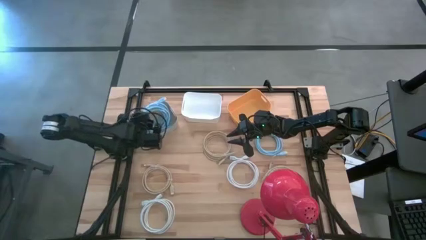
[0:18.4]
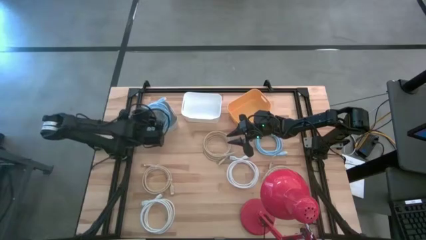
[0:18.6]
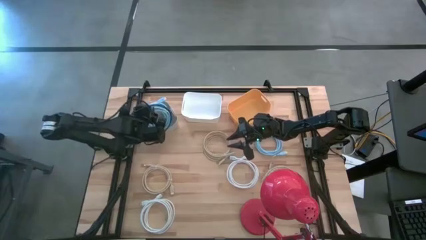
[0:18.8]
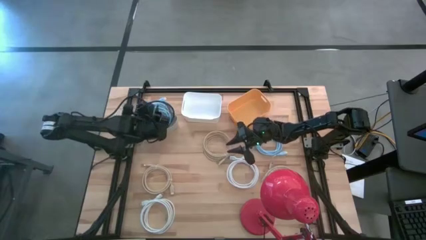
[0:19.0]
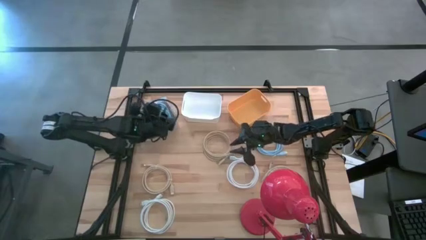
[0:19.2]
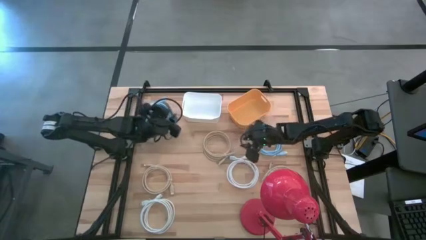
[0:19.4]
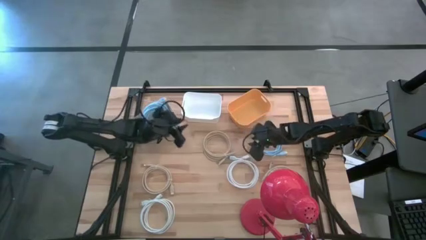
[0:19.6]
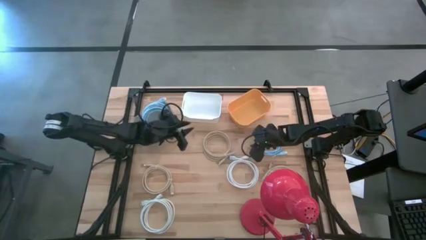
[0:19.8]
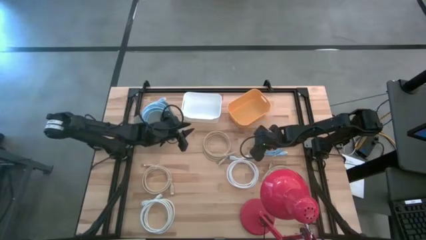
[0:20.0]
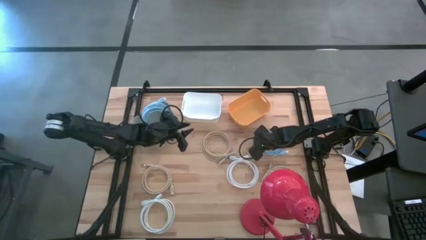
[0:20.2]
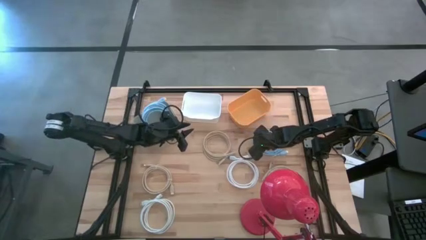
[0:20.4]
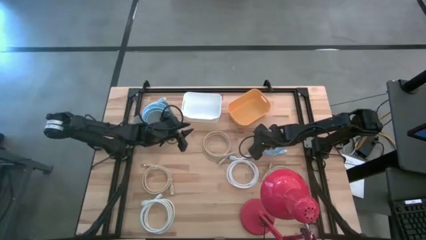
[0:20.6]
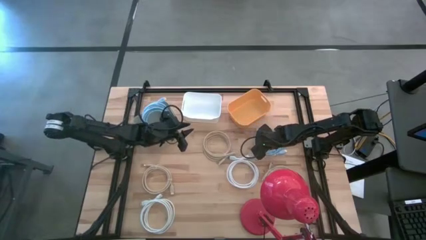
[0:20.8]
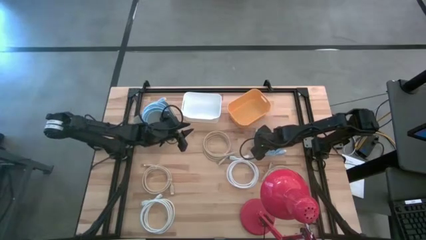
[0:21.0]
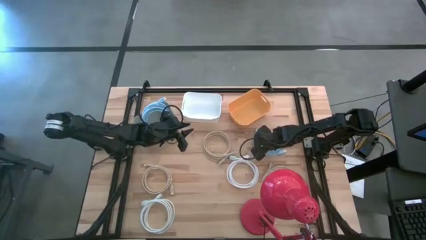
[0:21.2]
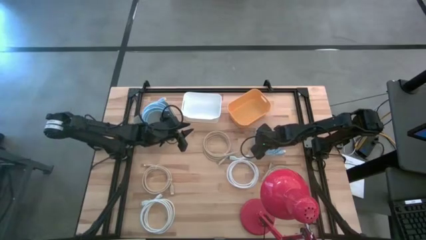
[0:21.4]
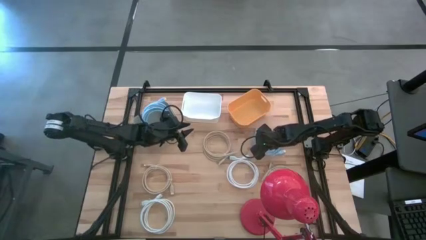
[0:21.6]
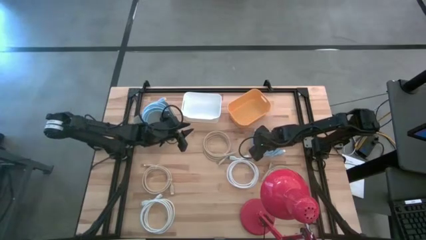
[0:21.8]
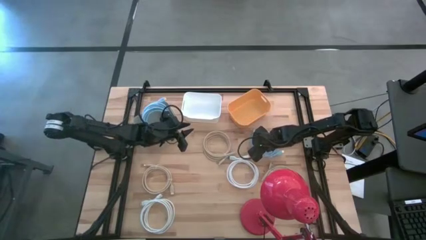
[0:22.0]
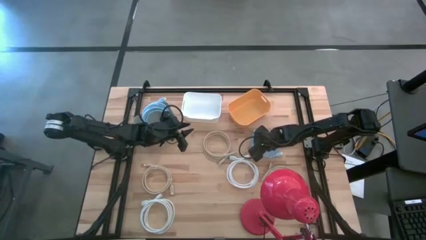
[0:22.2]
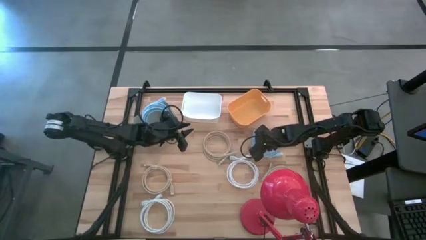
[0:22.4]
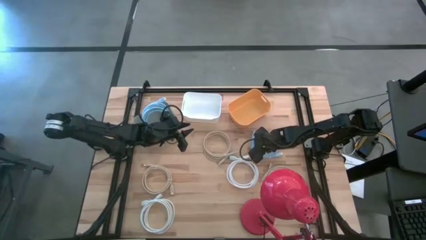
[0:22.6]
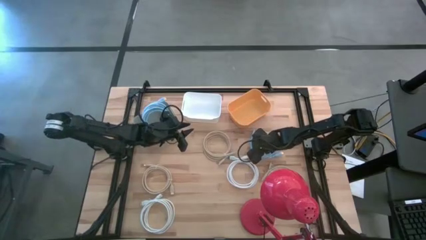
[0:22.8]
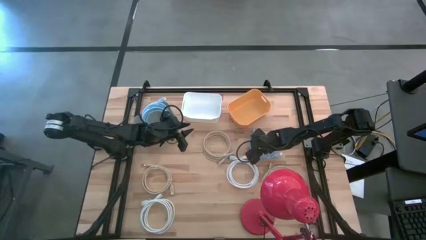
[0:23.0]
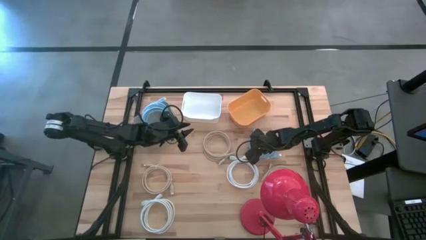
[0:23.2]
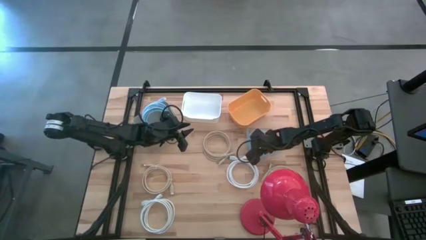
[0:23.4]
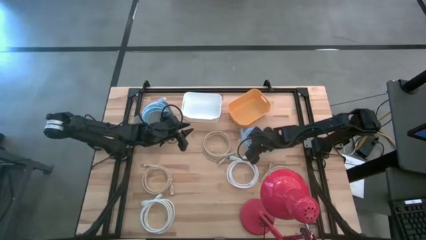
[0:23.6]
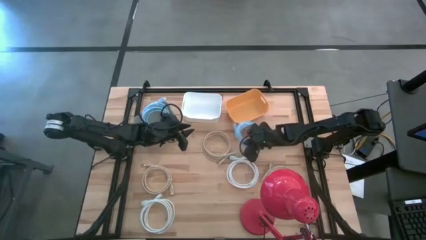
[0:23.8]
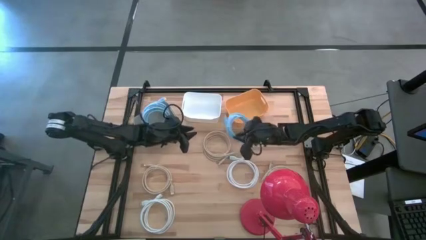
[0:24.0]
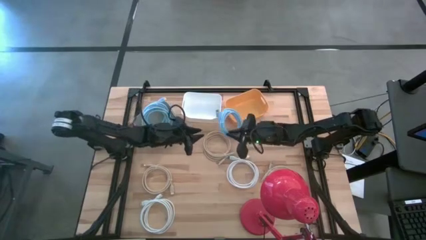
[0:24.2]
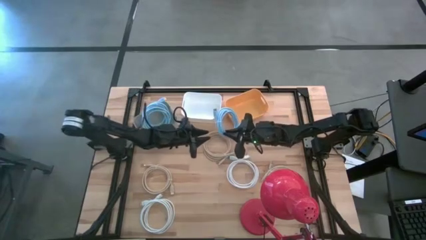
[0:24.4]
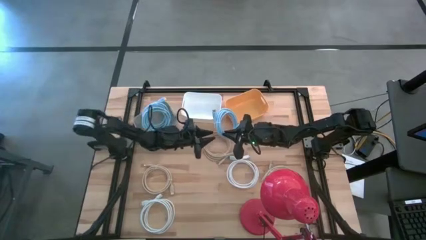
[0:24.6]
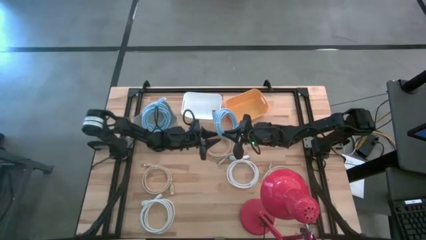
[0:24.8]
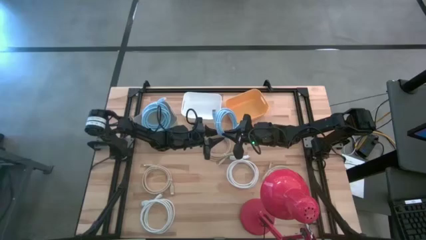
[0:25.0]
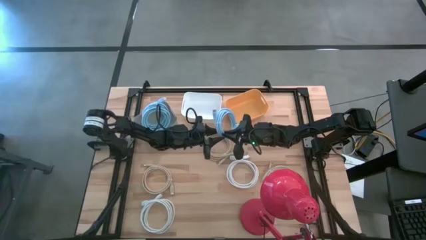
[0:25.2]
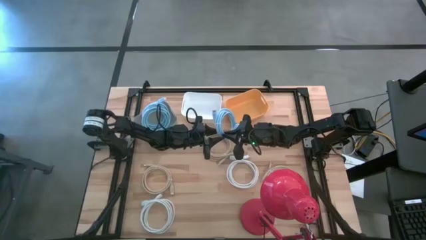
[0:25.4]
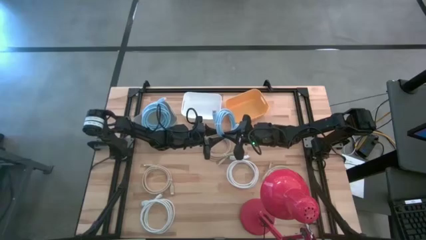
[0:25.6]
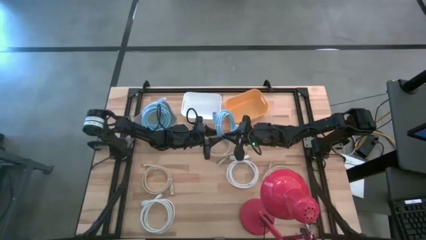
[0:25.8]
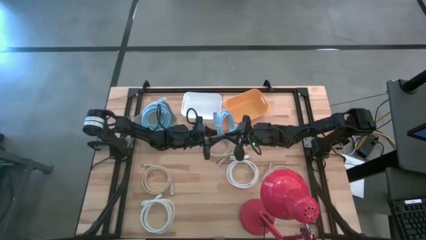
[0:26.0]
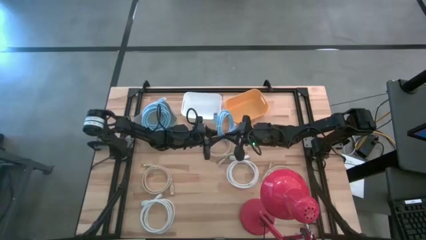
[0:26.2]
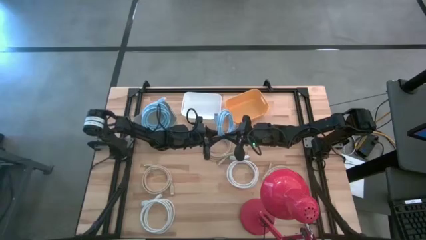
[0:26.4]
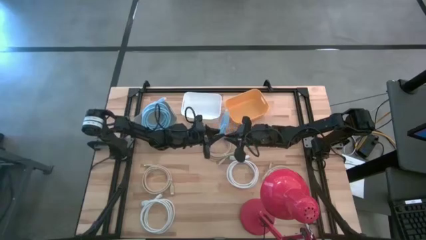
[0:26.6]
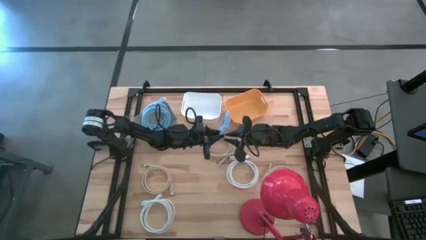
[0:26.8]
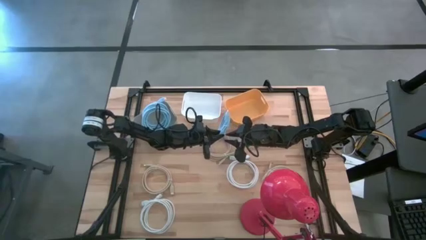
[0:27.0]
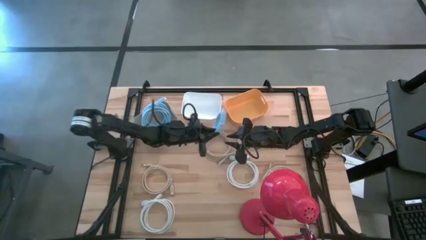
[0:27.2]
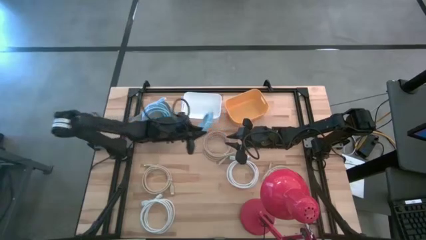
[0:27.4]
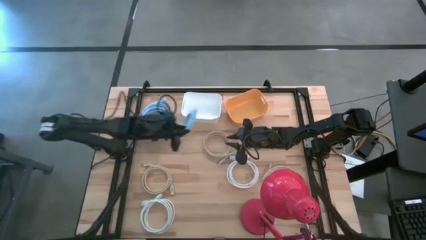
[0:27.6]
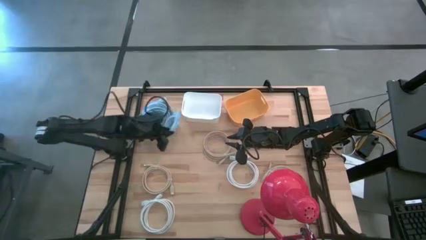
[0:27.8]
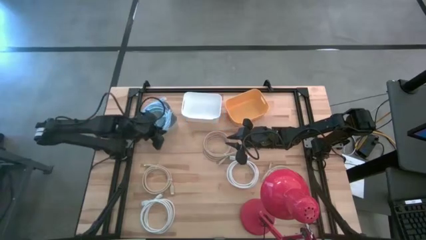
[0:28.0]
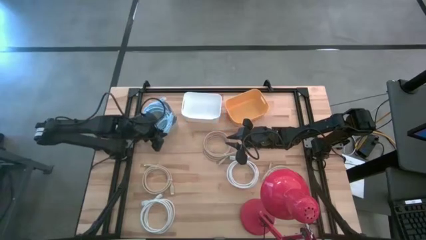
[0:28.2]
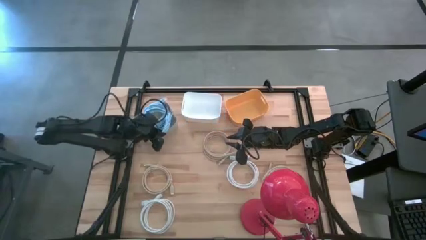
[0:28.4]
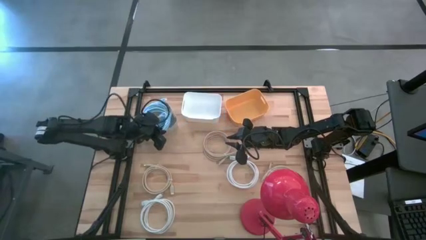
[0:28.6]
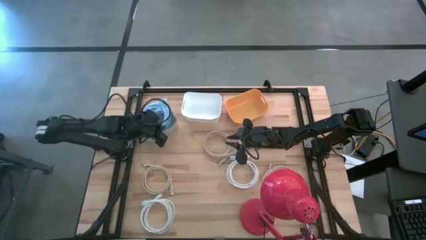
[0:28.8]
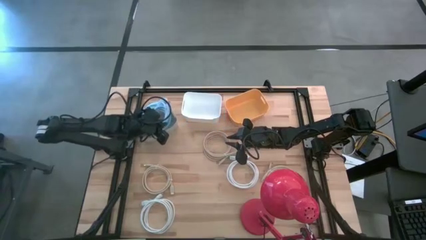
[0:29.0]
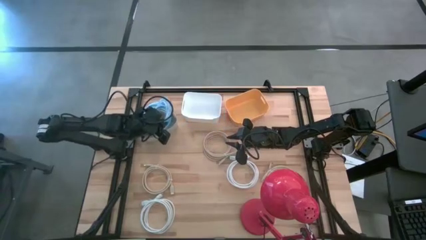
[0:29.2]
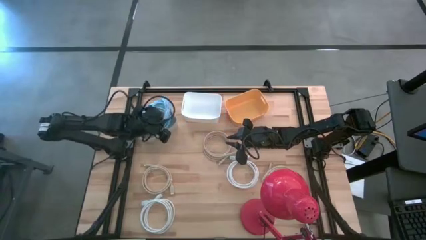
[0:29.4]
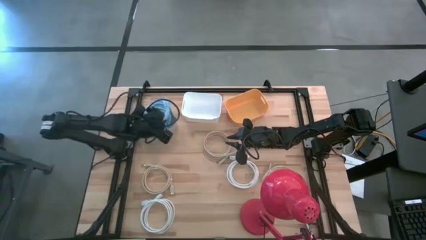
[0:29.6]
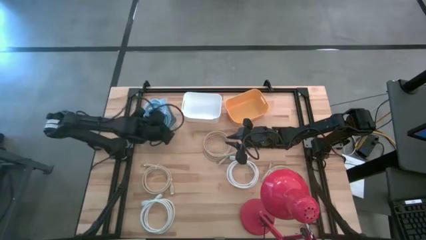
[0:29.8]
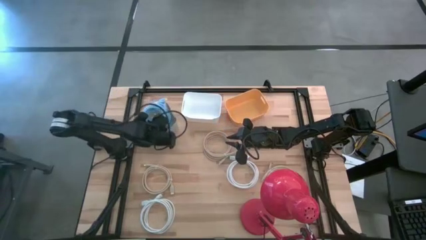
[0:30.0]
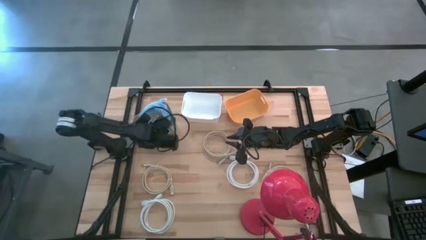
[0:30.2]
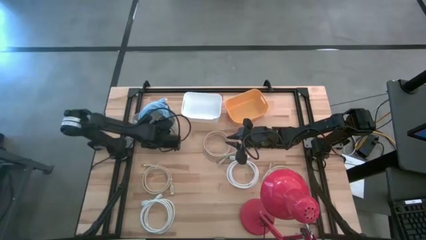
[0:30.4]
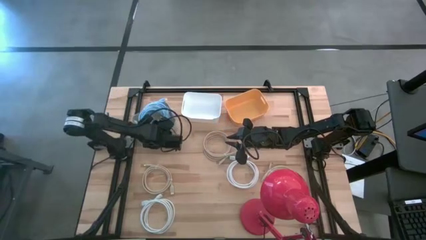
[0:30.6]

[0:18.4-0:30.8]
Task: Pick & Place USB Port
Put the blue USB cable into the gray bin

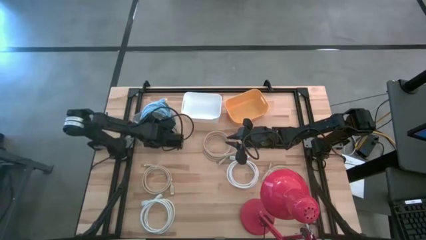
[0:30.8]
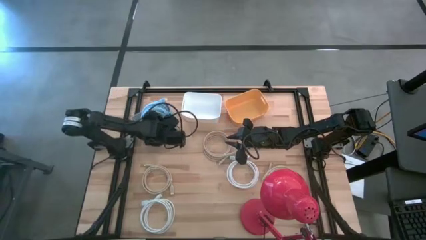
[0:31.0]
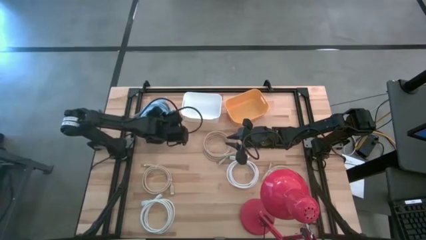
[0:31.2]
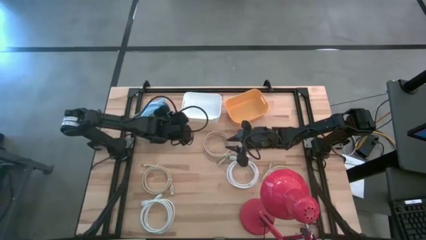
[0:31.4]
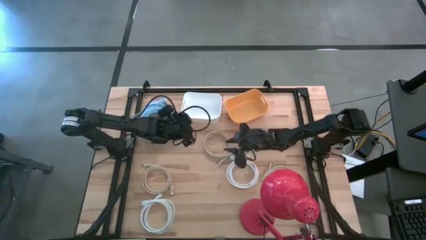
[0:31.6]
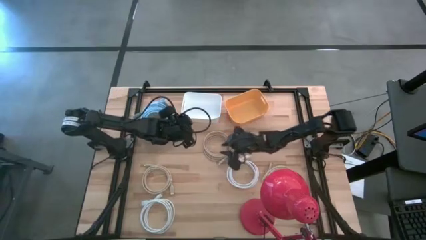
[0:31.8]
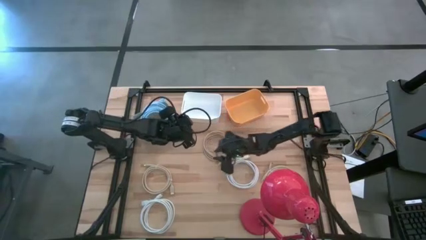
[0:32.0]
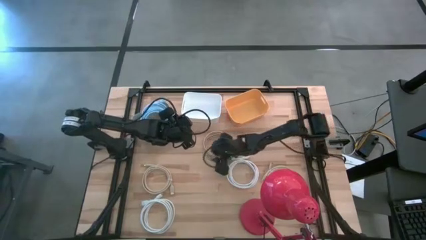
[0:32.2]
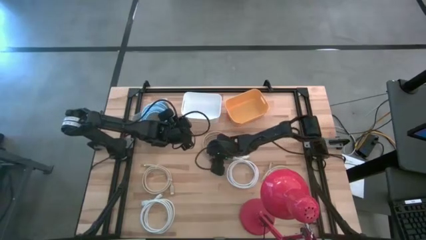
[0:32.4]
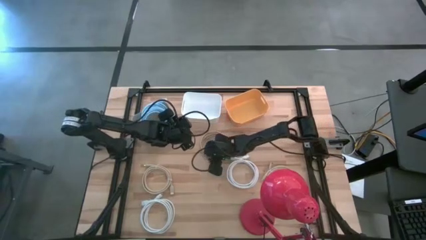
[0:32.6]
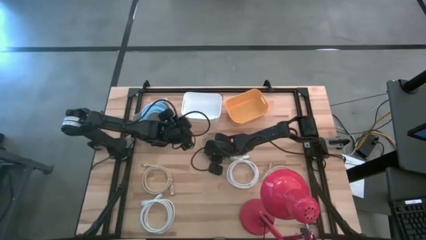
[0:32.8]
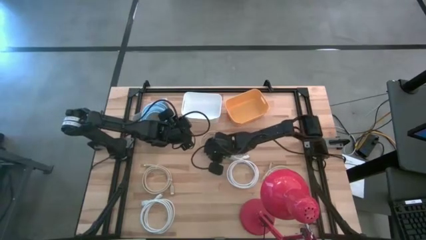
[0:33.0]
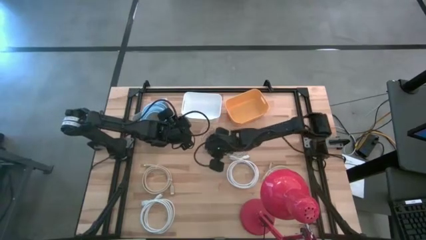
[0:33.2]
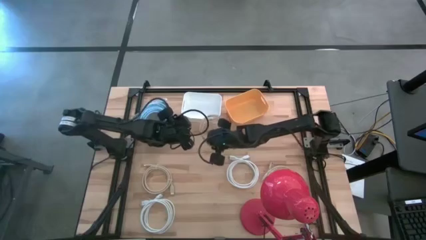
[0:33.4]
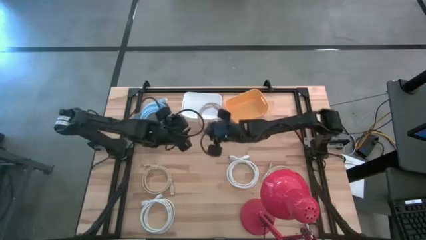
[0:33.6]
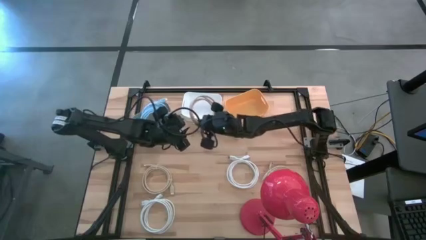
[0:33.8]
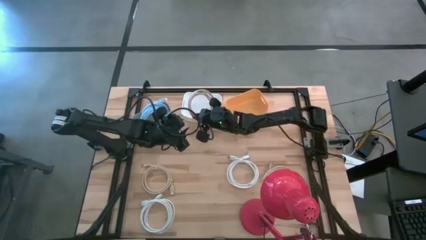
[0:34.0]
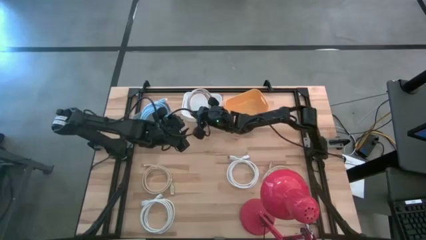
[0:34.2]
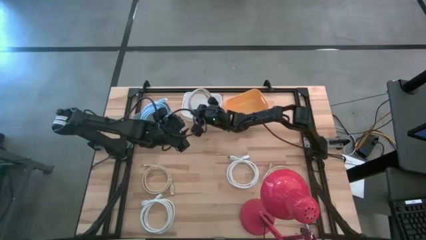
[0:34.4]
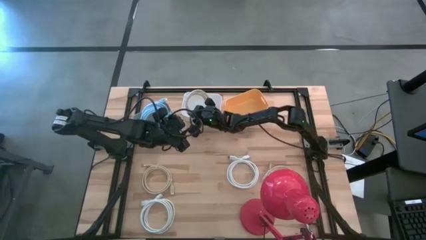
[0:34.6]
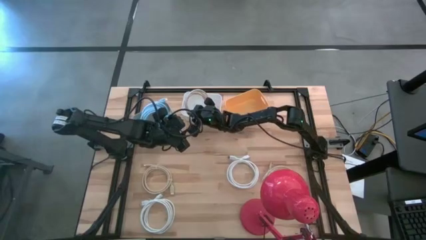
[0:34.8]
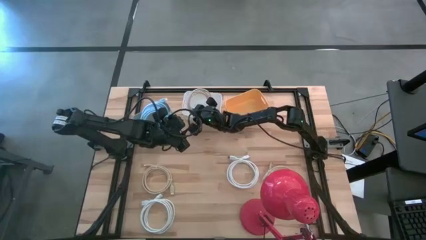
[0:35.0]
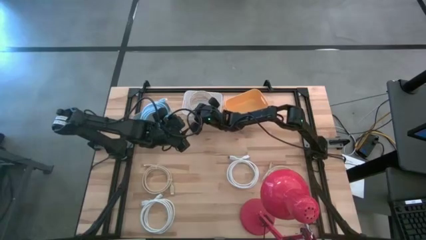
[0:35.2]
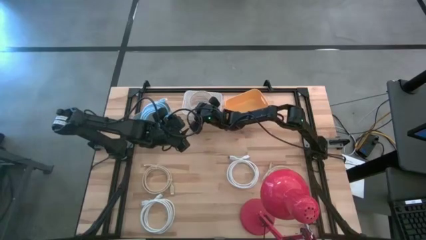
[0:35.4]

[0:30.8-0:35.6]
Put the top brown USB cable into the white bin
